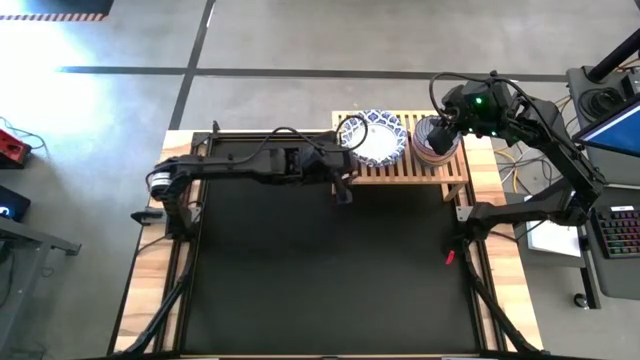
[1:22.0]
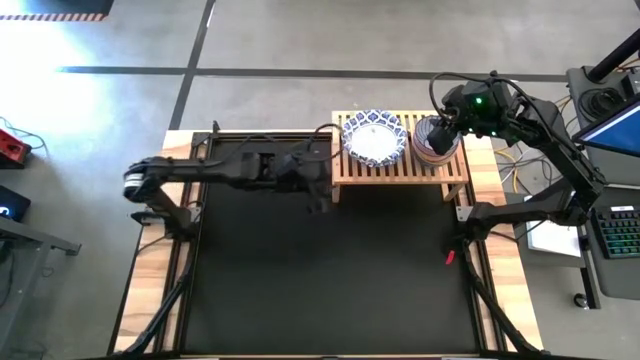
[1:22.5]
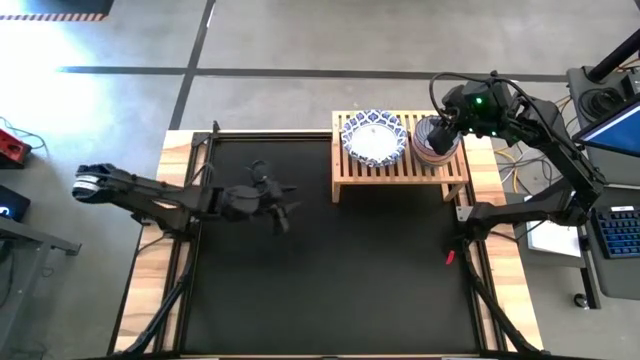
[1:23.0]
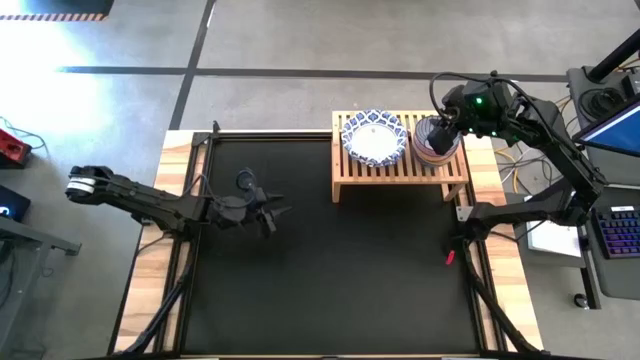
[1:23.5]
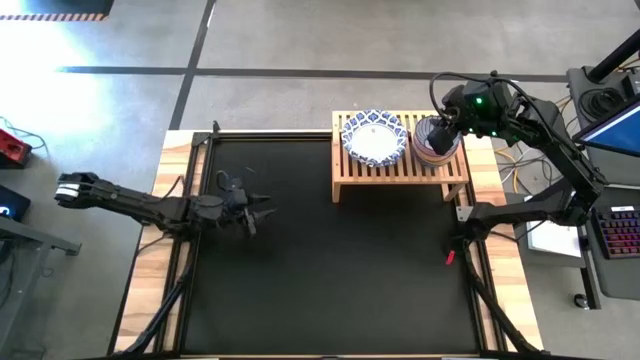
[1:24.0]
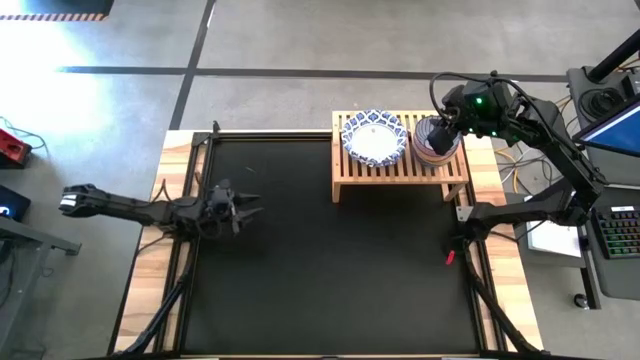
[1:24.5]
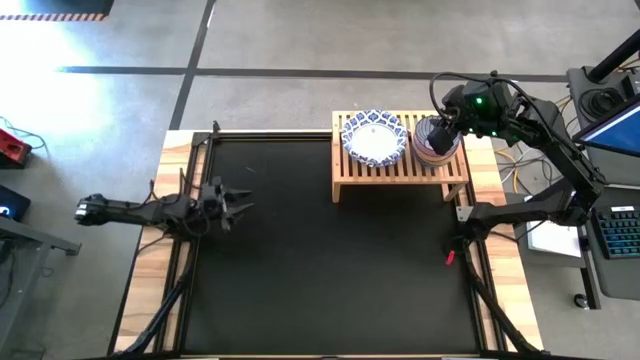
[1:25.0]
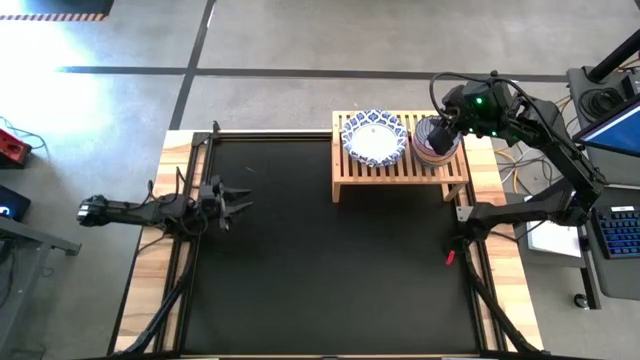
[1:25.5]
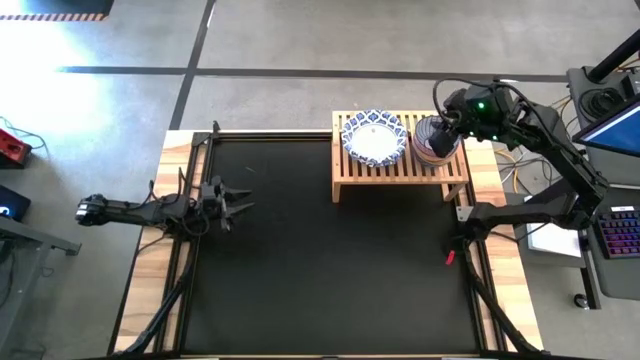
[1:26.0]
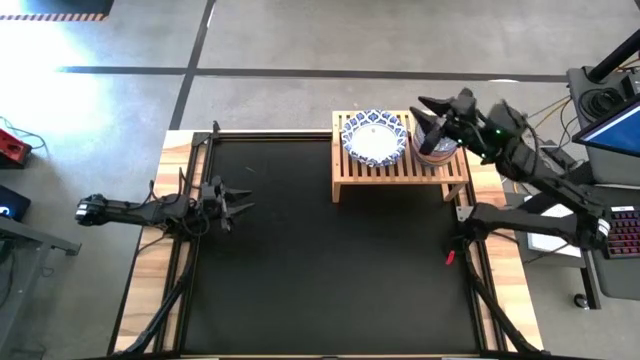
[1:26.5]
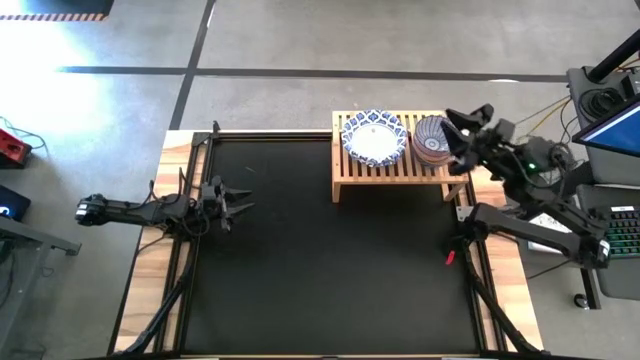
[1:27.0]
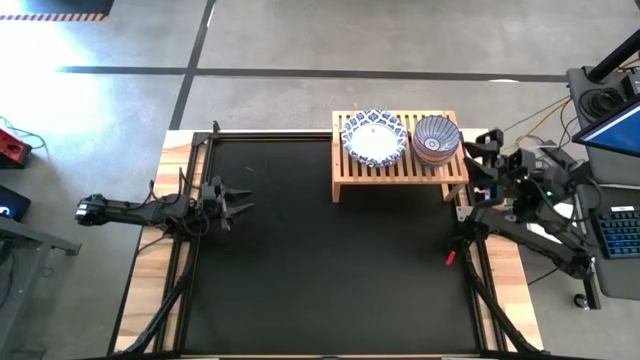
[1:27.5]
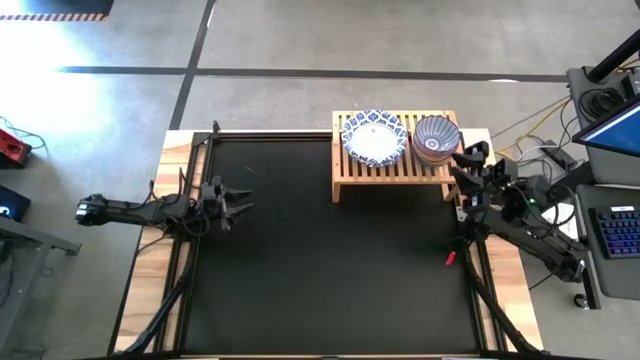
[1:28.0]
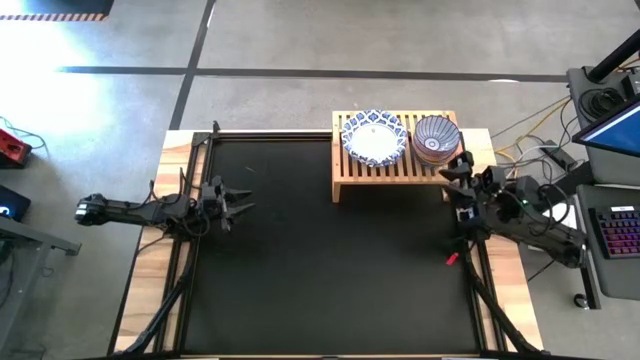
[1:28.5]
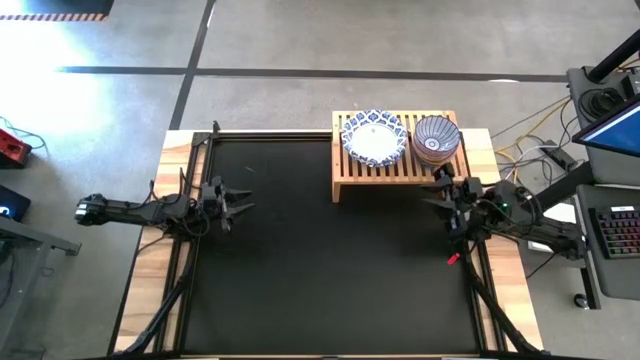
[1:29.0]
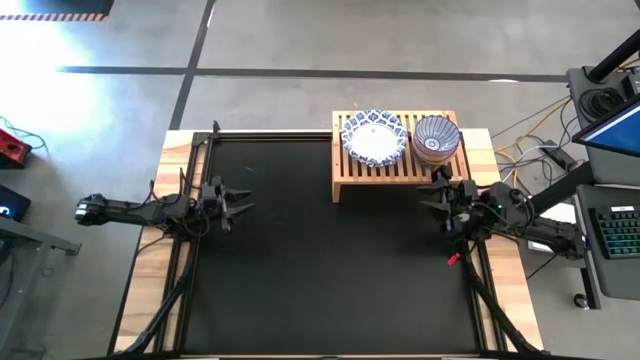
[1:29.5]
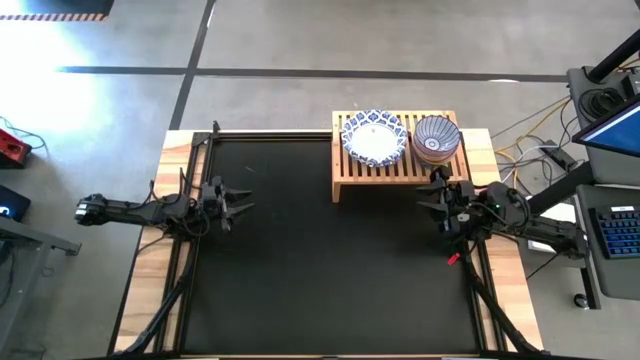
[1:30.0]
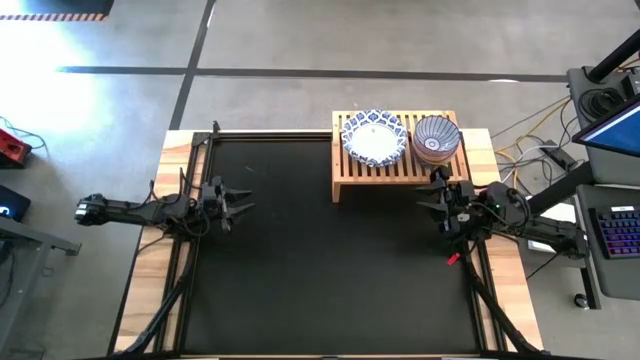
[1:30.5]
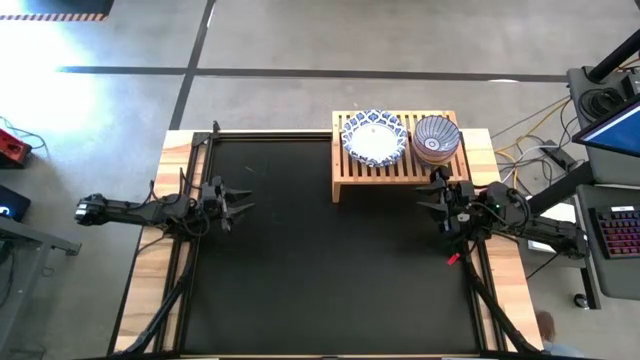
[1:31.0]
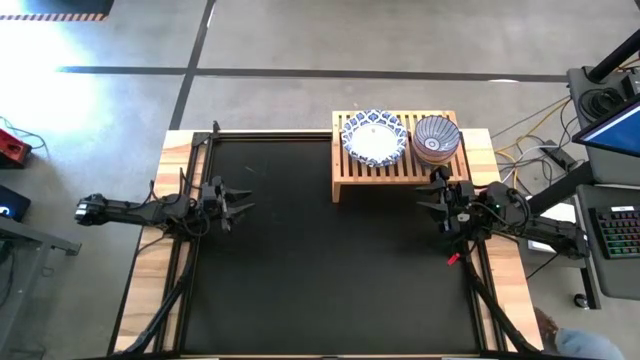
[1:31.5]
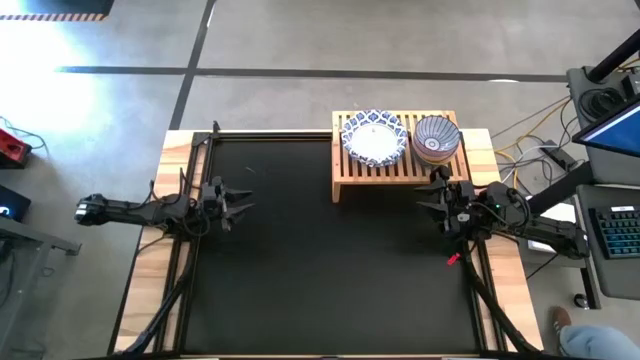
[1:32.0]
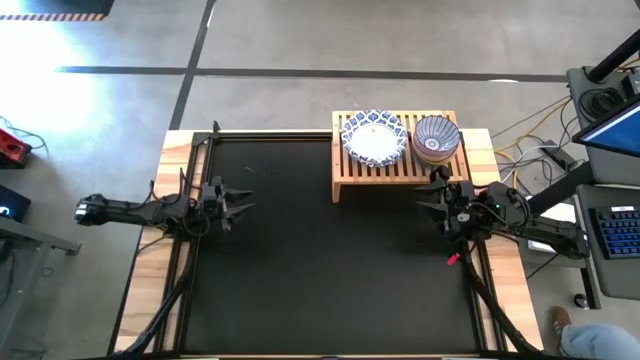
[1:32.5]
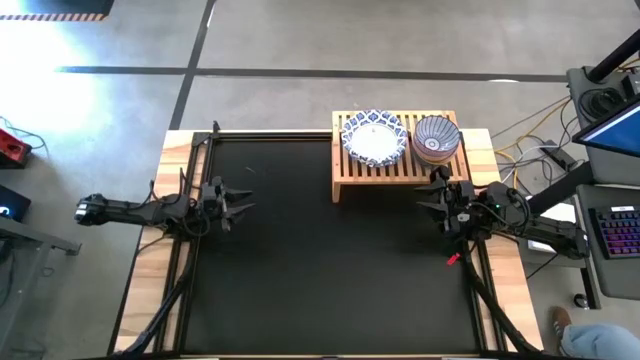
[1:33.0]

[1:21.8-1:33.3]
Task: Place and stack bowls onto a shelf
Return to Home Position

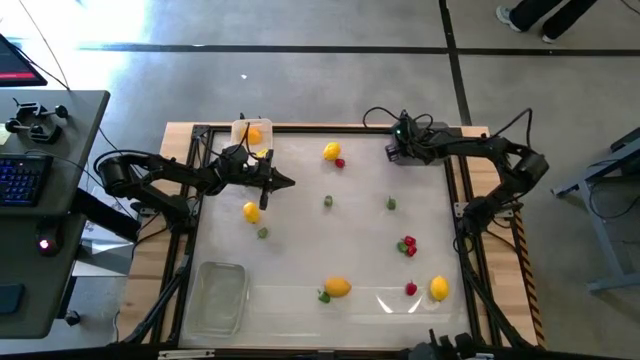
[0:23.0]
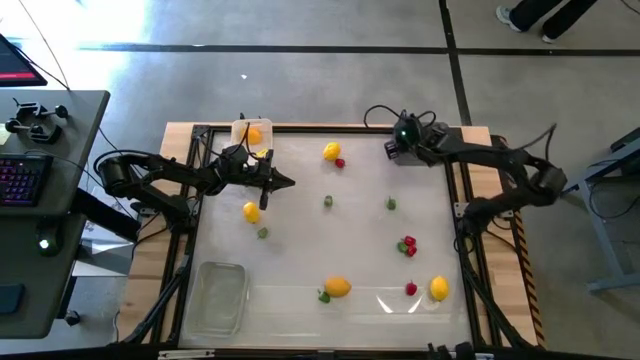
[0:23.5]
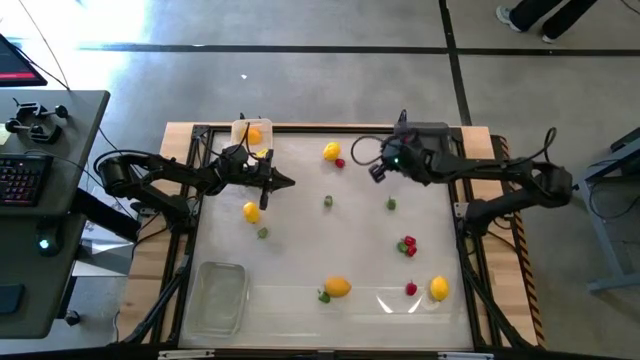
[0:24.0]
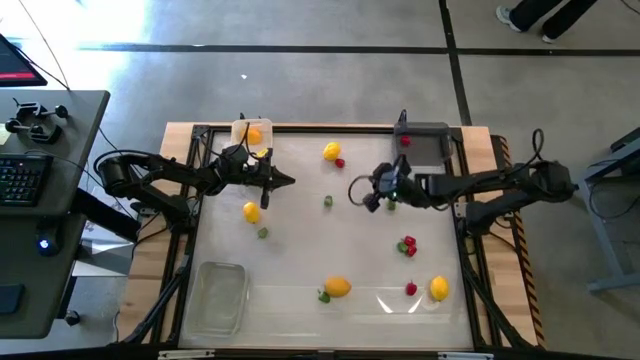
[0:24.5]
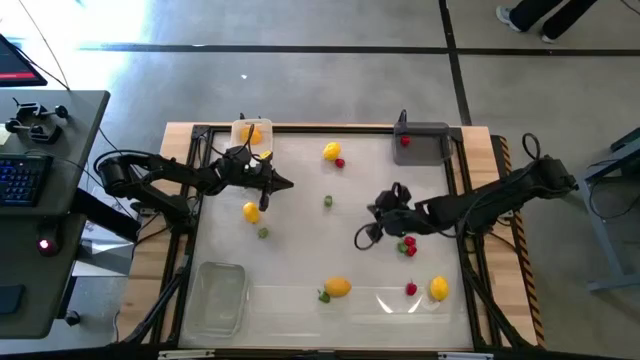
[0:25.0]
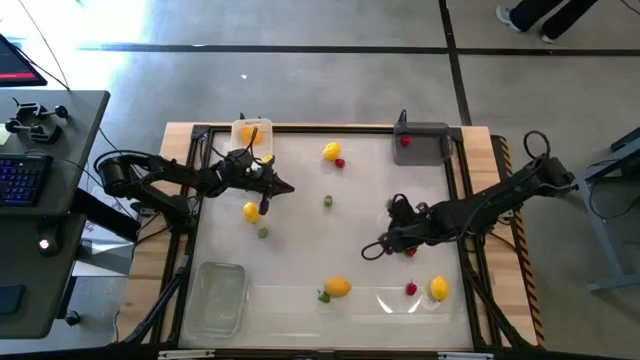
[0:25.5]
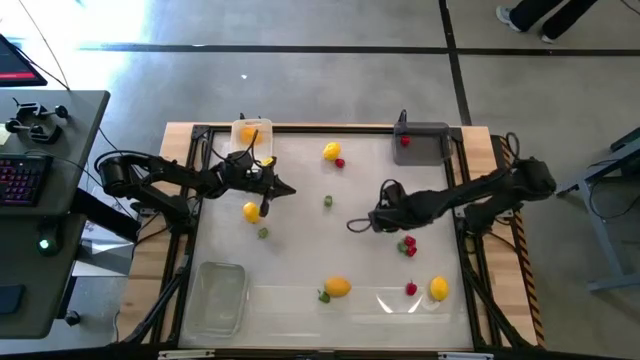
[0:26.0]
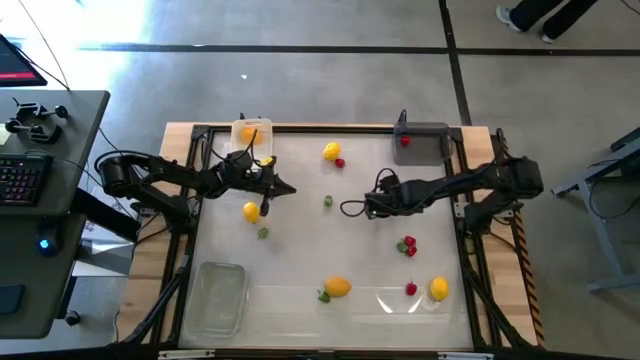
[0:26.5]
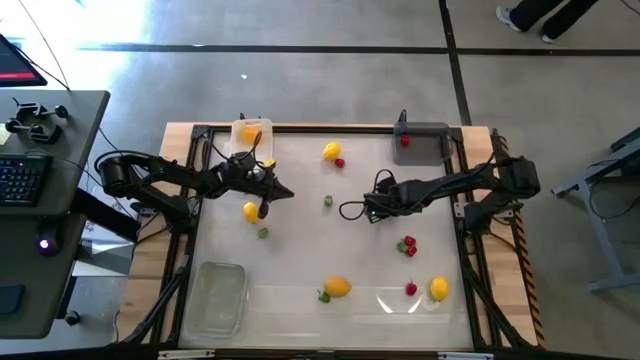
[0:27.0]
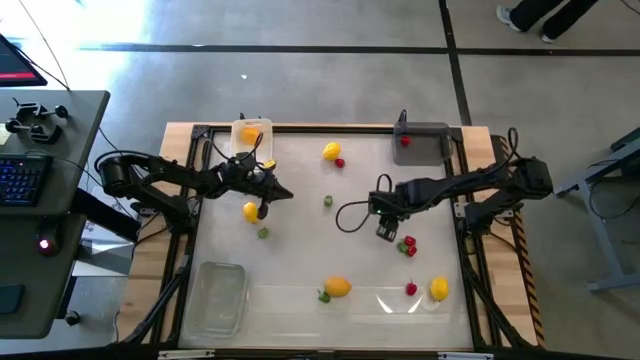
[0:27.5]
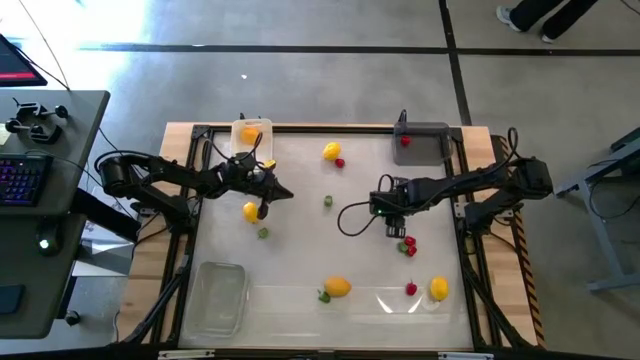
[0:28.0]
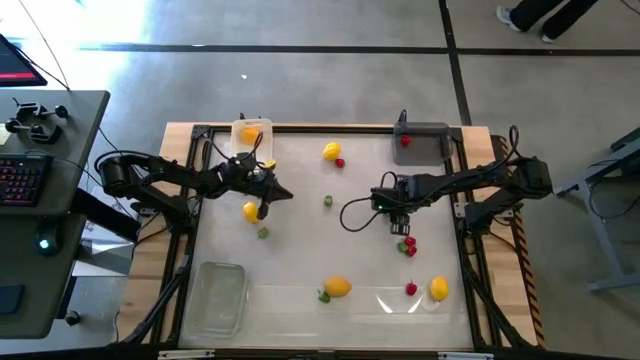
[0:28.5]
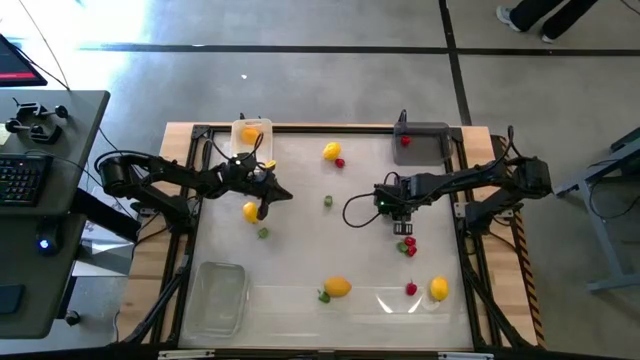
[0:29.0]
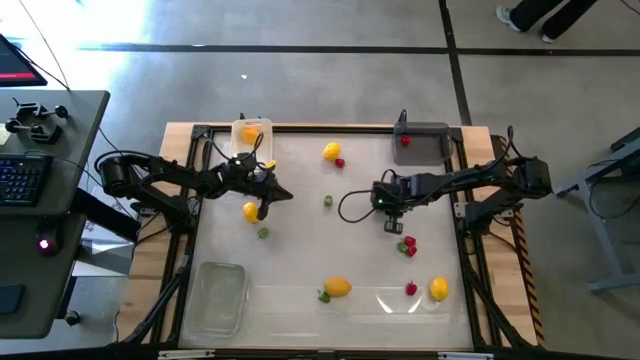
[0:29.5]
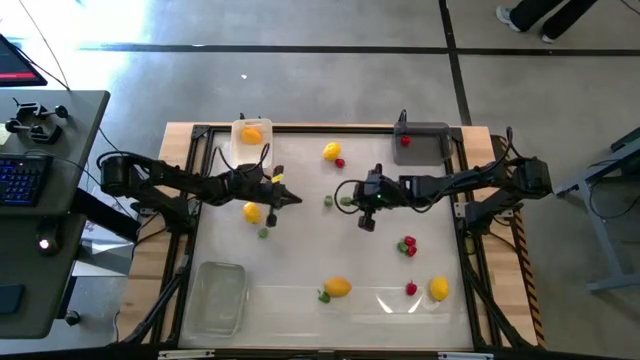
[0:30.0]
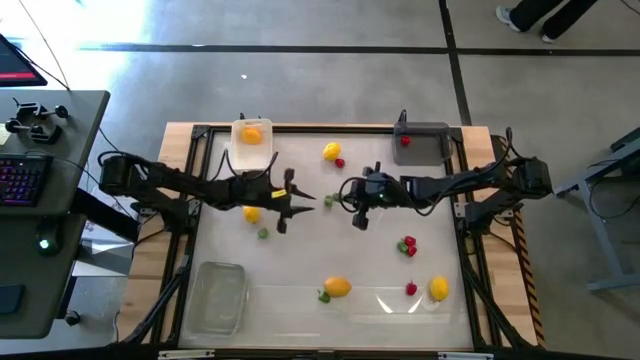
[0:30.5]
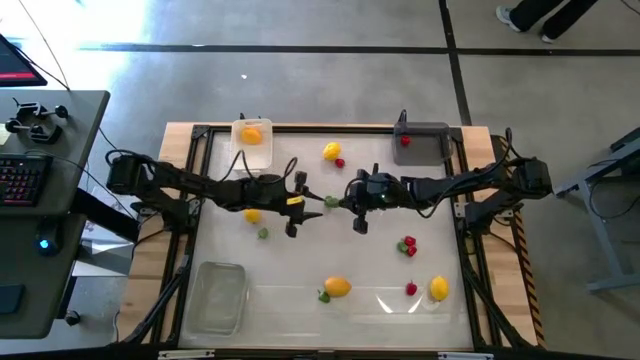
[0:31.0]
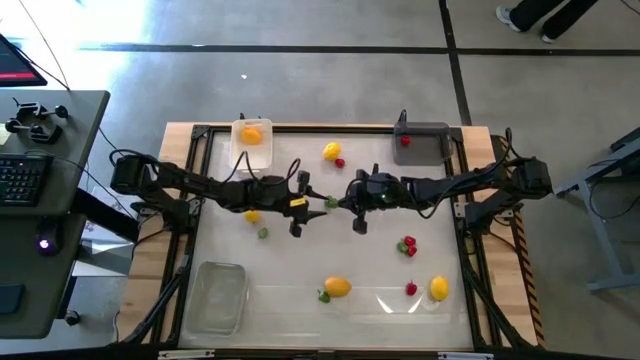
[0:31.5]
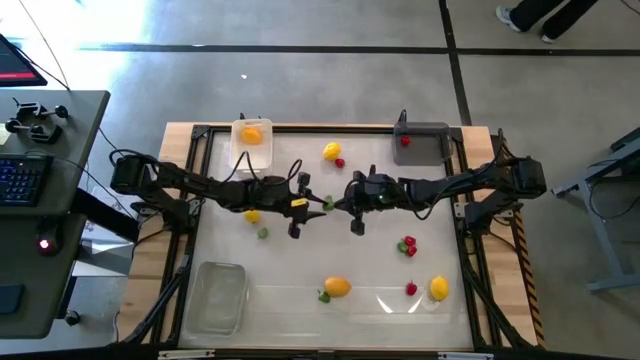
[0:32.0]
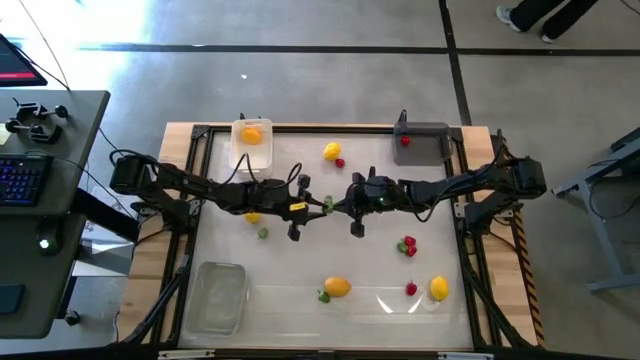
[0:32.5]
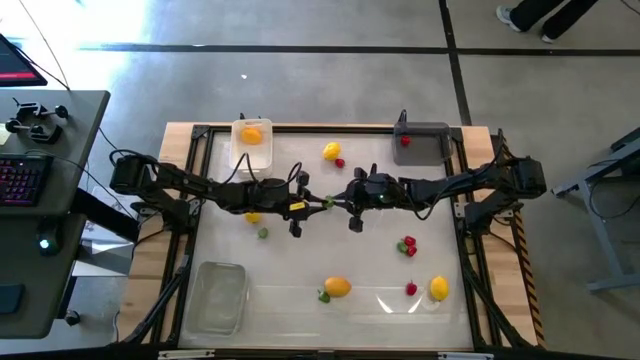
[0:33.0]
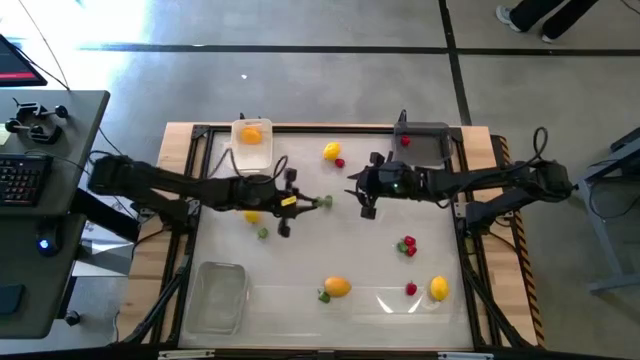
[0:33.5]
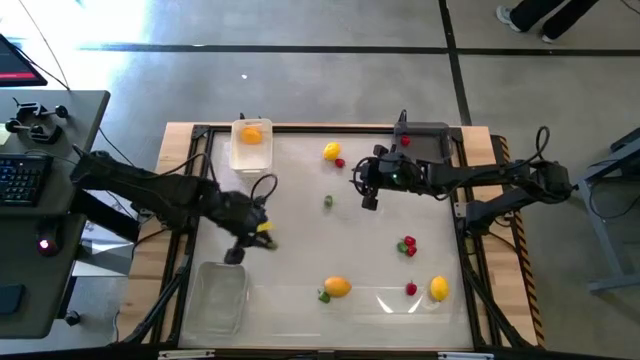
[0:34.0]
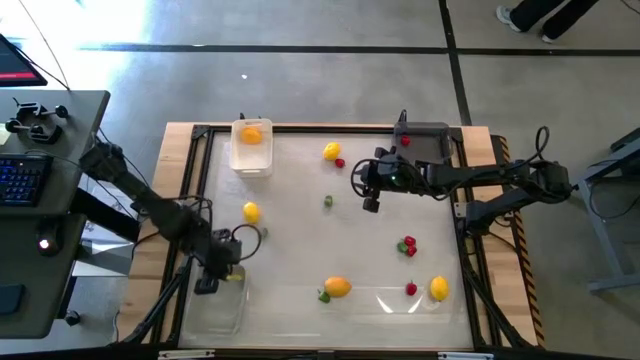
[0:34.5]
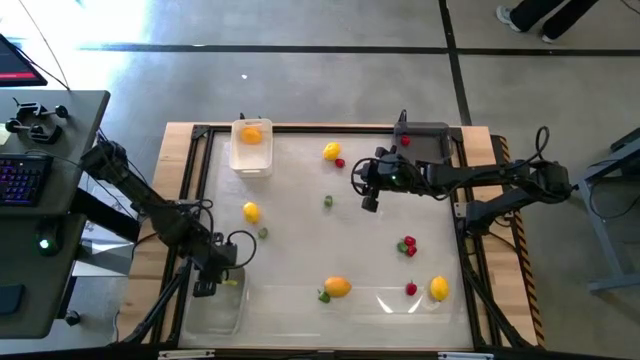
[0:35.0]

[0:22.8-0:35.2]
Task: Sort produce into baskets
Put the green bell pepper into the grey bin
